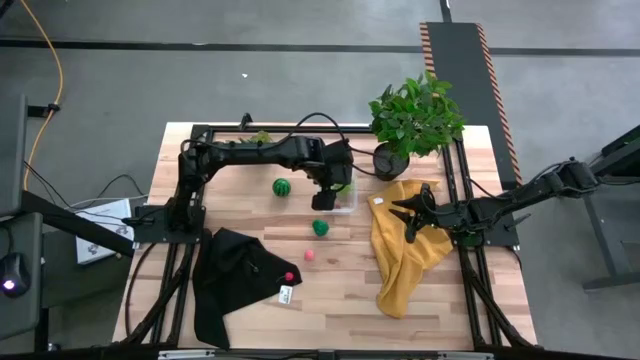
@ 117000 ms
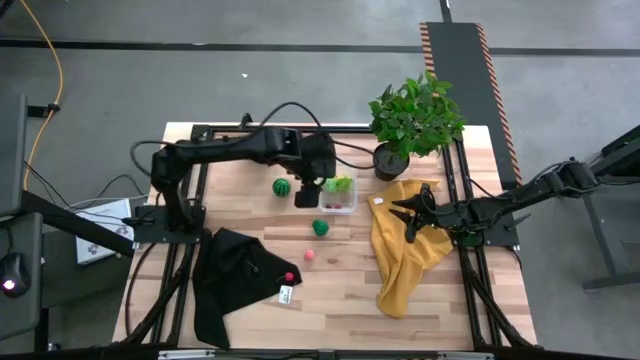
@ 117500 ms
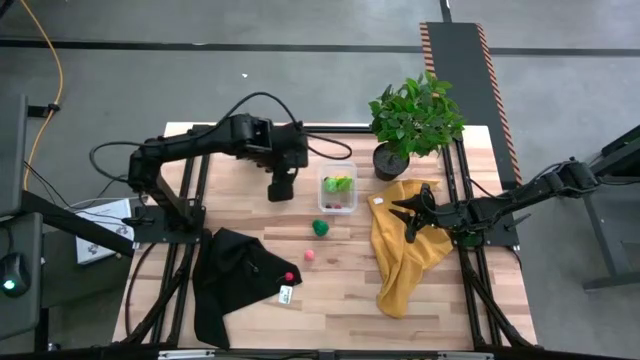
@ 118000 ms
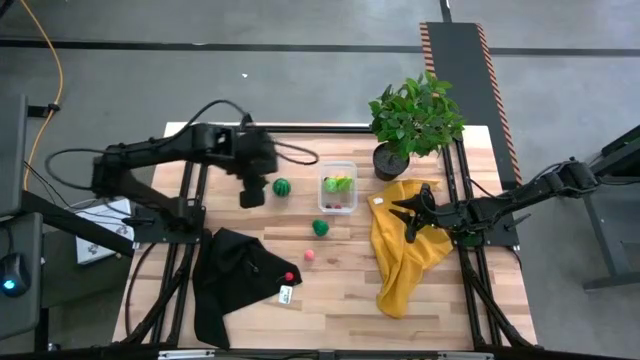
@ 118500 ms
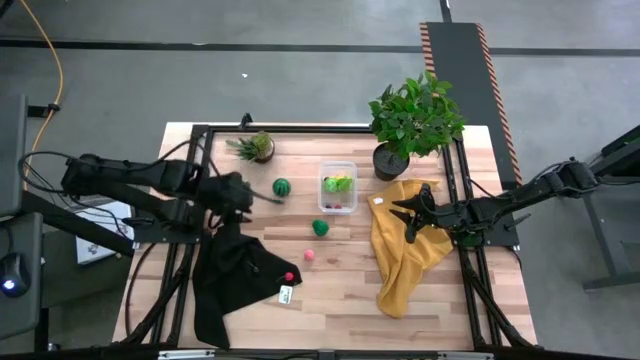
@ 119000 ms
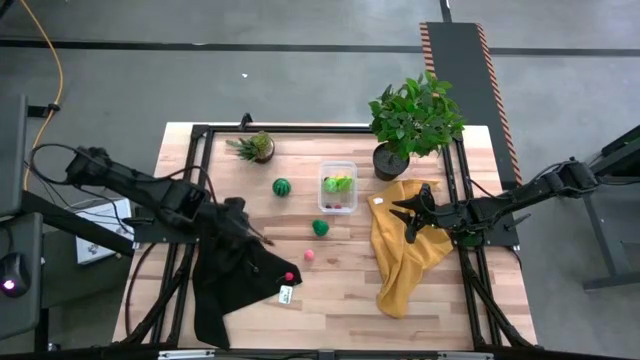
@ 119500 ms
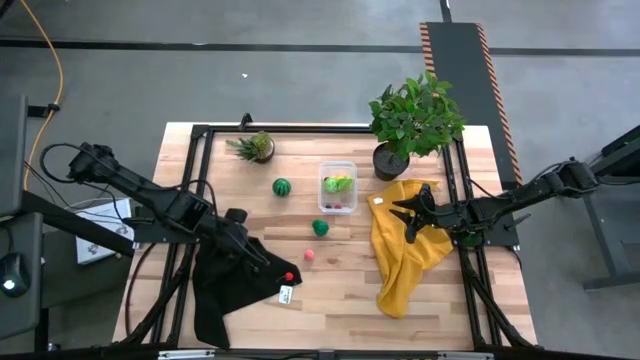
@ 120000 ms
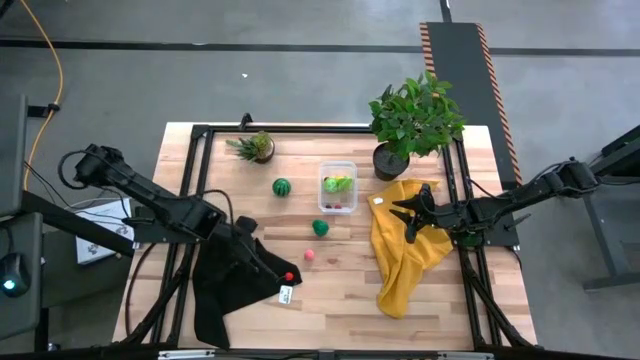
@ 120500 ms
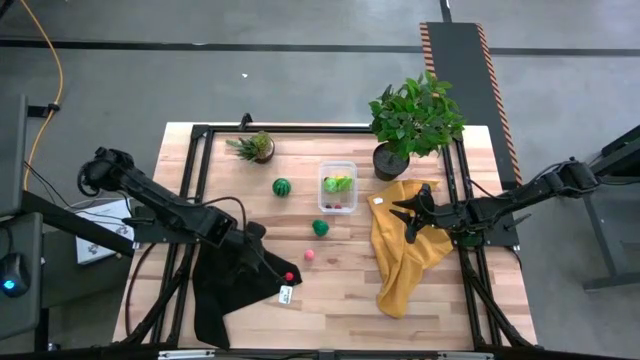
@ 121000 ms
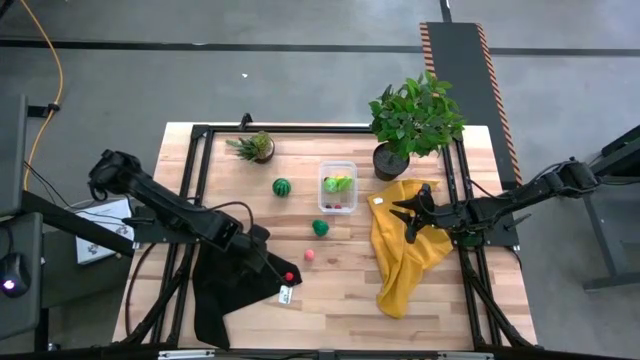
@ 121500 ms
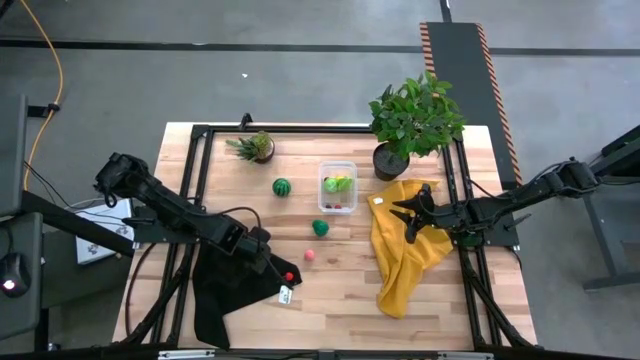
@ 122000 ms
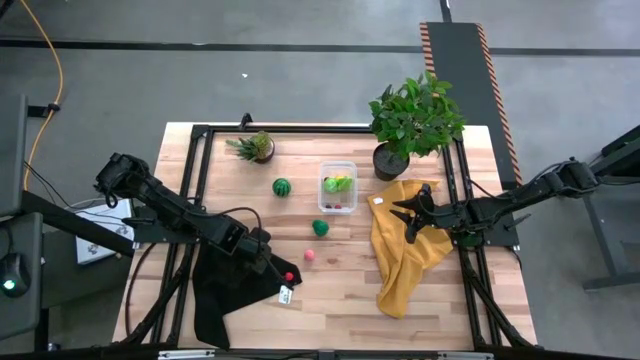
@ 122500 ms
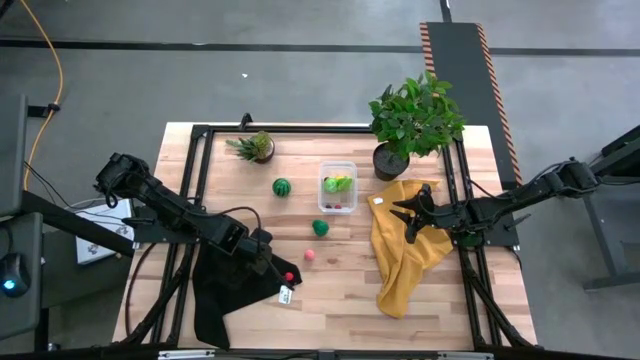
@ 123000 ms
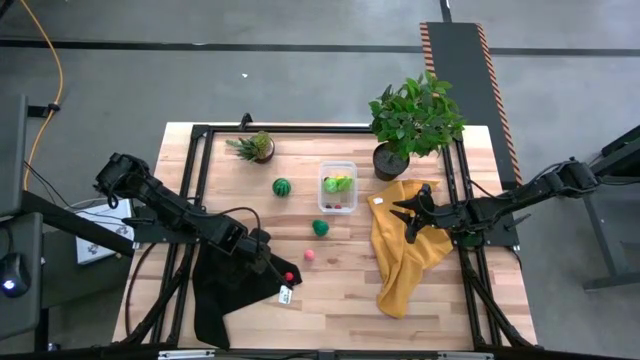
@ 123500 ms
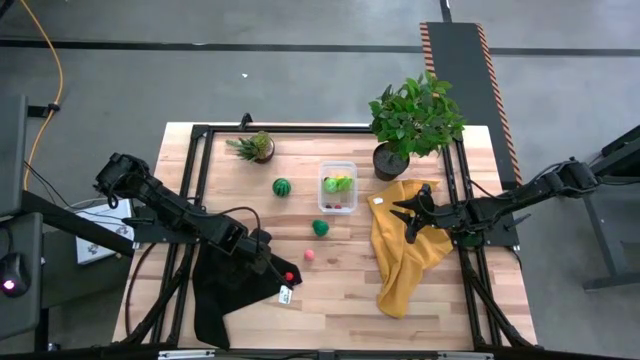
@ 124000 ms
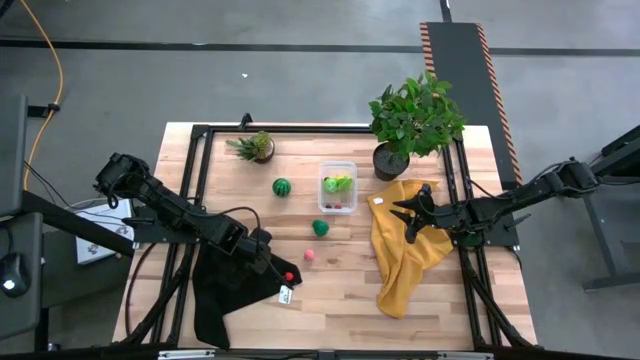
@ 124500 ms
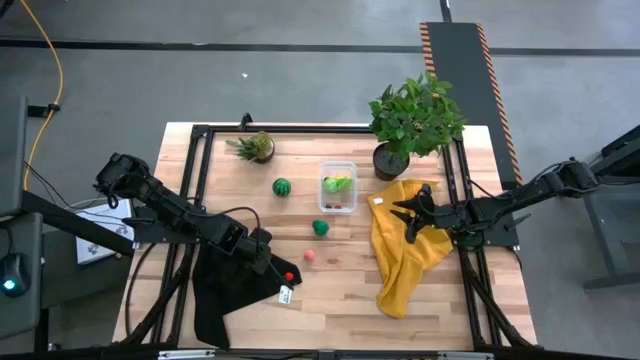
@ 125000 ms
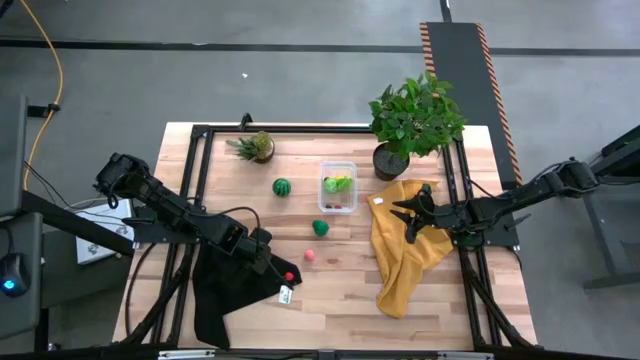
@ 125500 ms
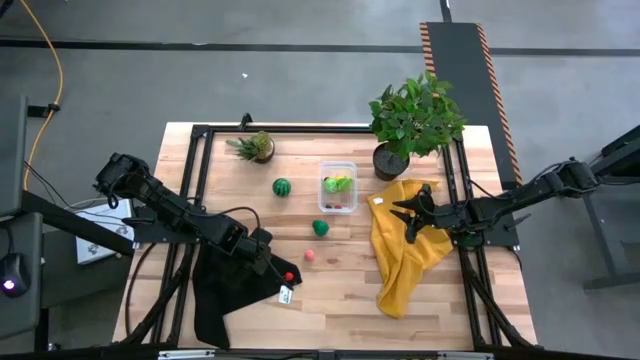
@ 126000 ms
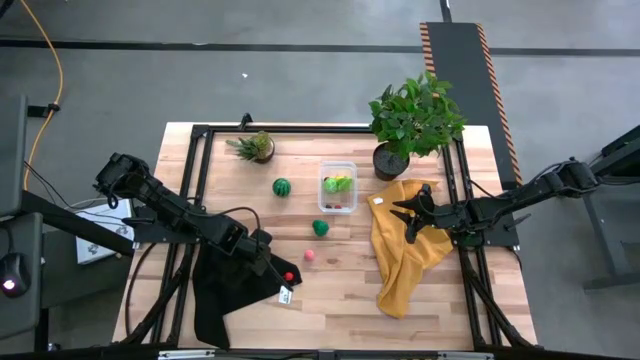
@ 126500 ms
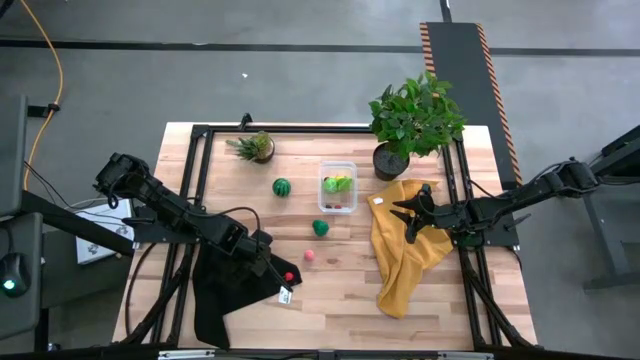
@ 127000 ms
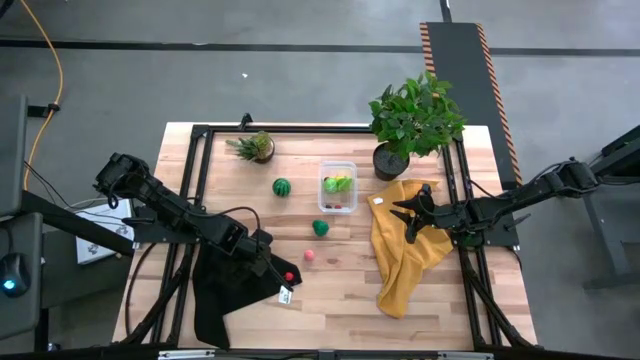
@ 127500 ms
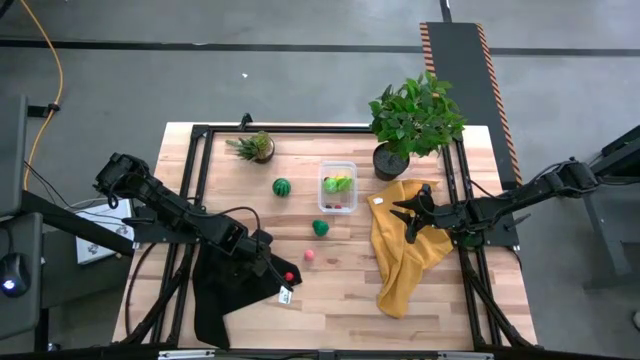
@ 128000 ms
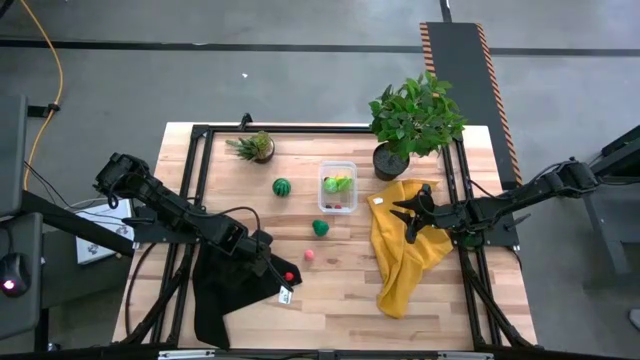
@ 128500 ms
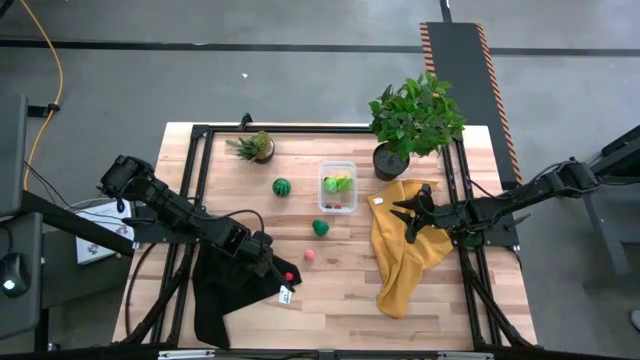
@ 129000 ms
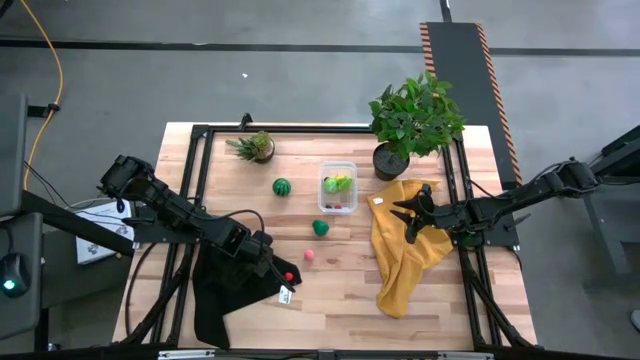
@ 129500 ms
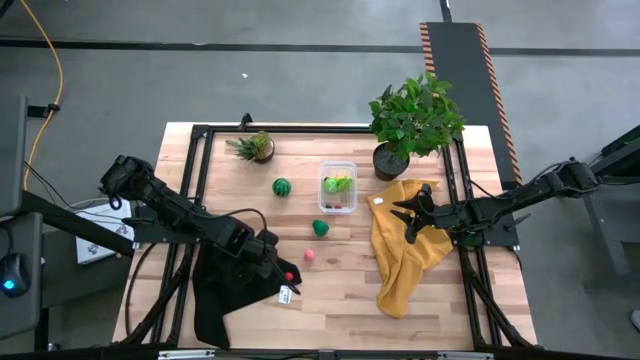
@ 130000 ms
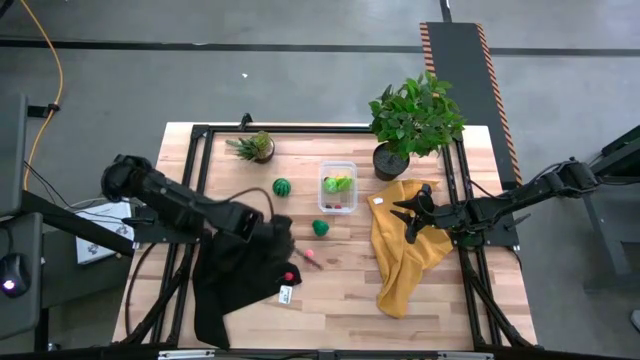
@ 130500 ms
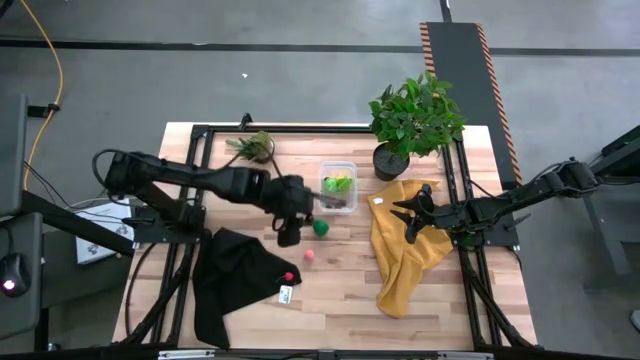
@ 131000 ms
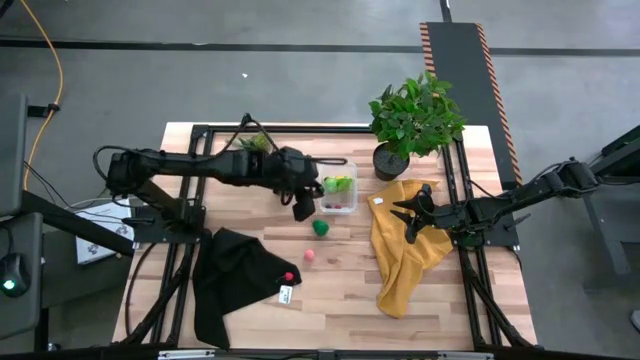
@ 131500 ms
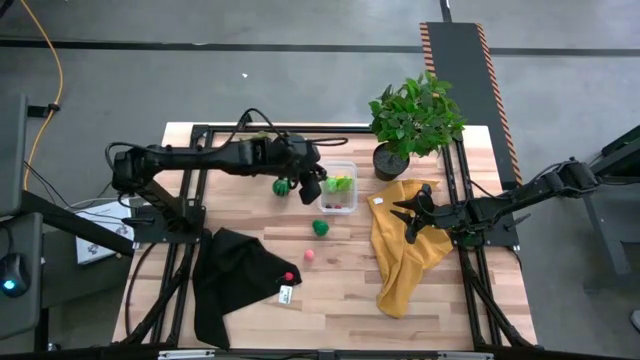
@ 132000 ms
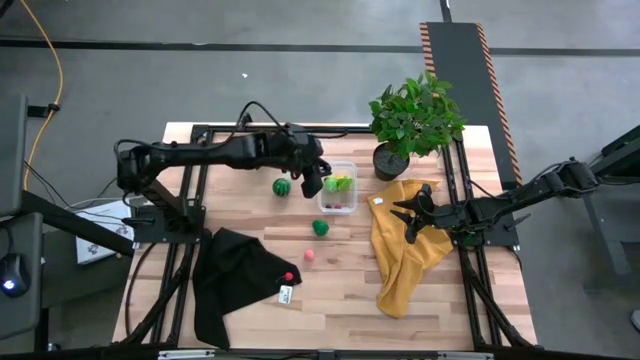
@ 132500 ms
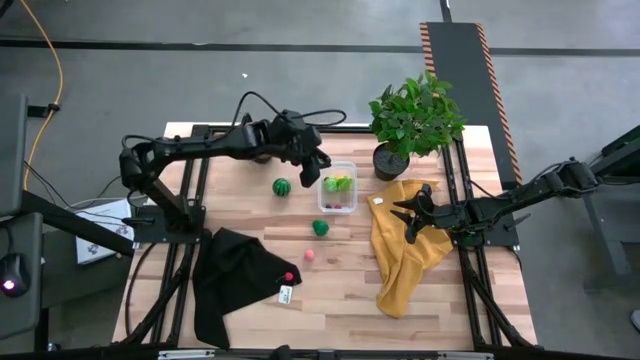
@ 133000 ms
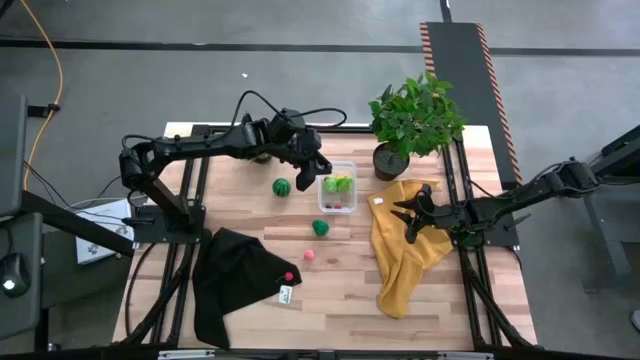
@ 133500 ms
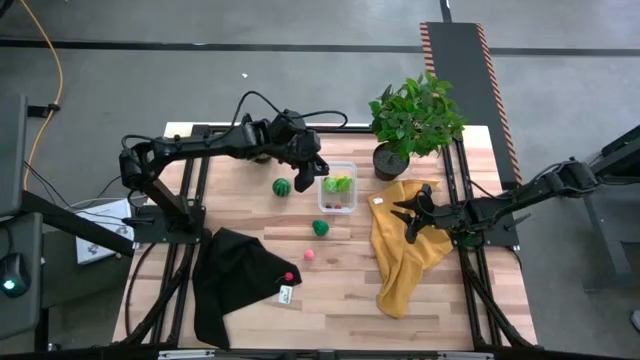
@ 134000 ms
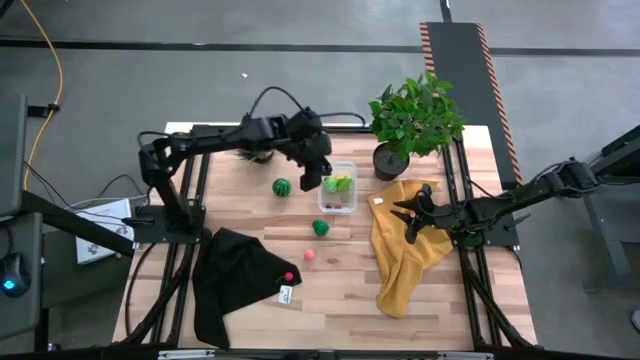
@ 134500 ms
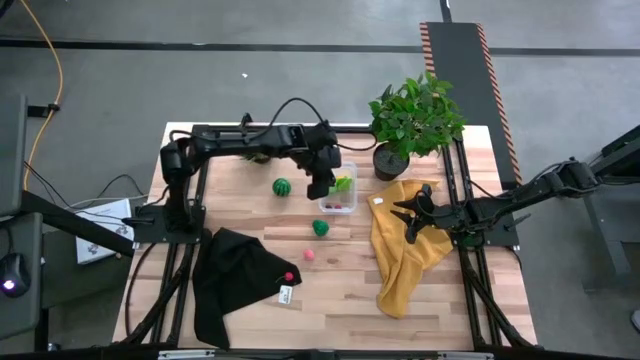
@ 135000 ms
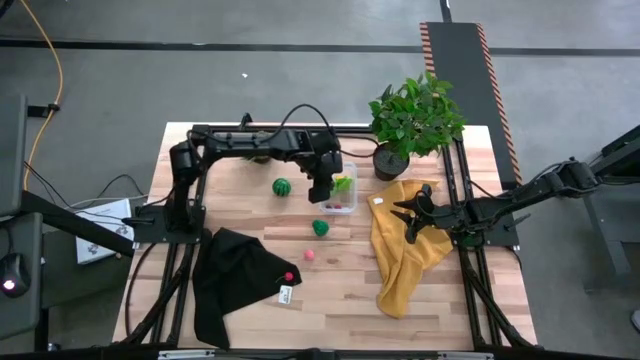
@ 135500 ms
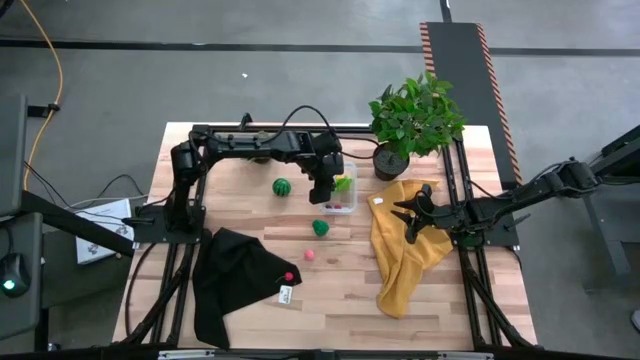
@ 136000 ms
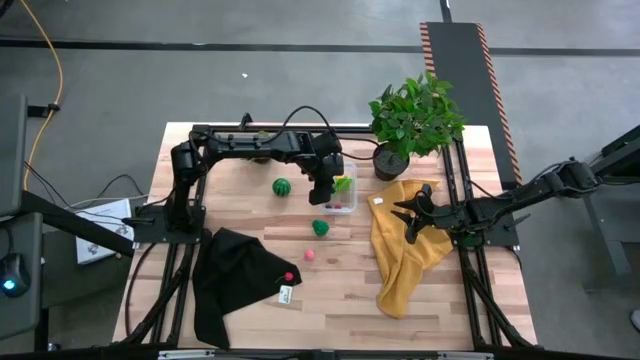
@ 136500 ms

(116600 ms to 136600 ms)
Task: Pick and placing Produce into tupperware
Put the black cherry into the transparent bin
